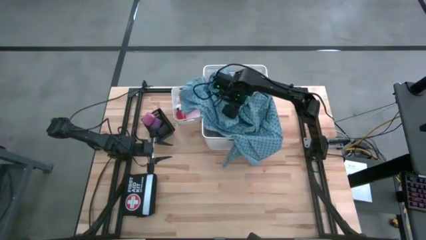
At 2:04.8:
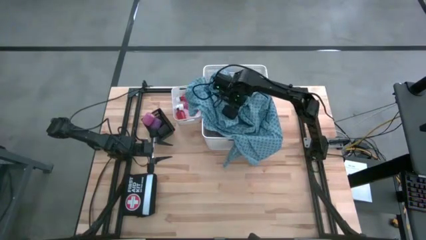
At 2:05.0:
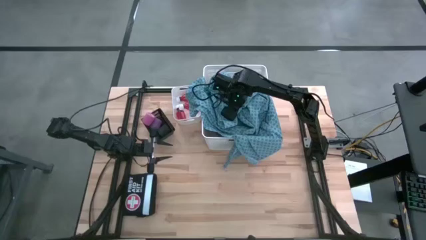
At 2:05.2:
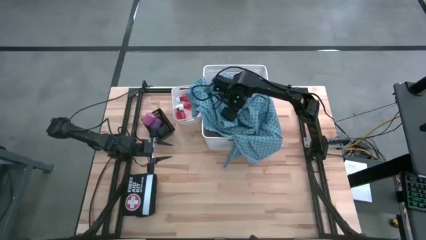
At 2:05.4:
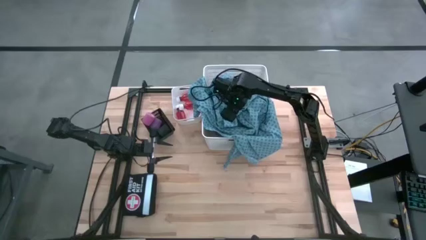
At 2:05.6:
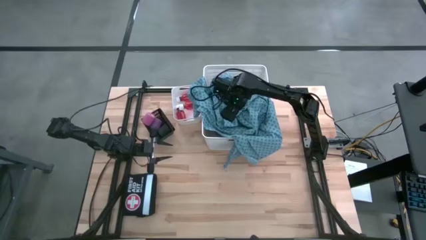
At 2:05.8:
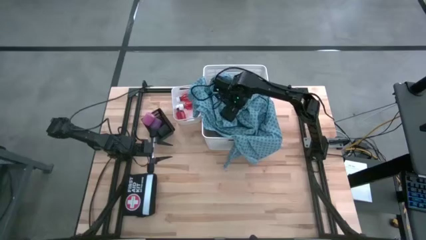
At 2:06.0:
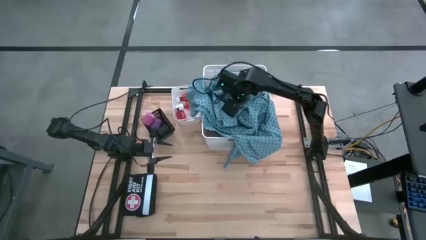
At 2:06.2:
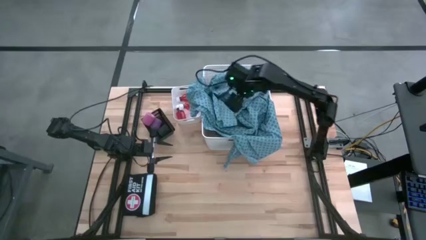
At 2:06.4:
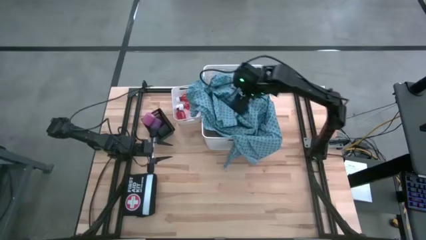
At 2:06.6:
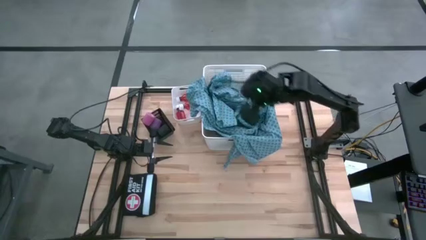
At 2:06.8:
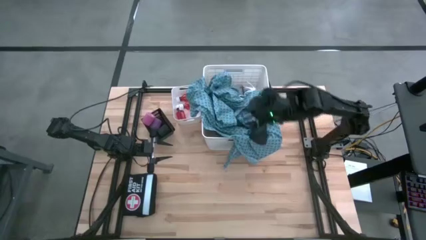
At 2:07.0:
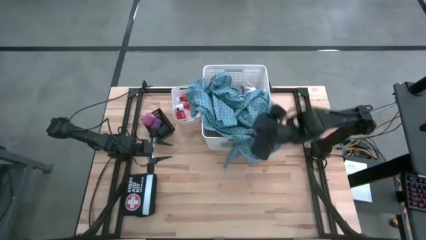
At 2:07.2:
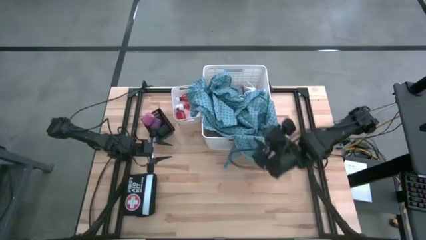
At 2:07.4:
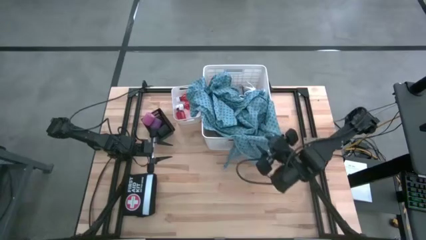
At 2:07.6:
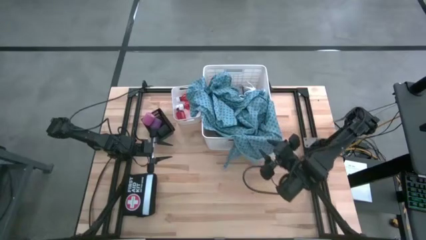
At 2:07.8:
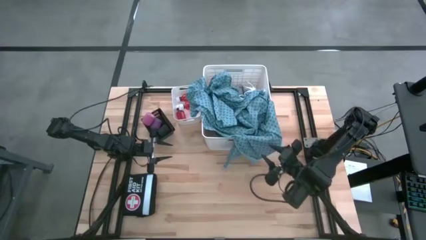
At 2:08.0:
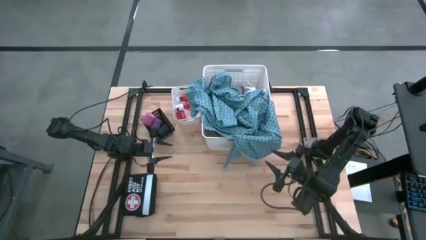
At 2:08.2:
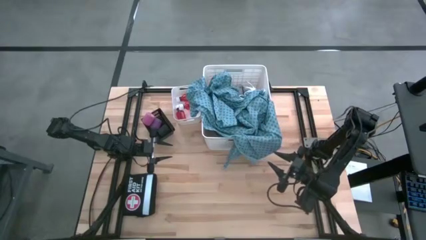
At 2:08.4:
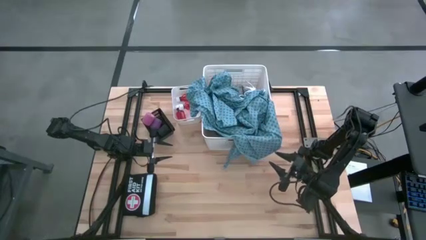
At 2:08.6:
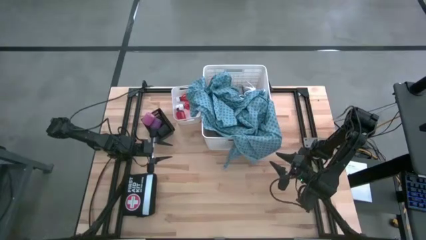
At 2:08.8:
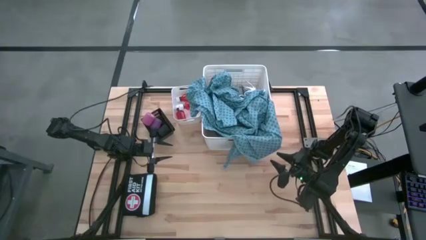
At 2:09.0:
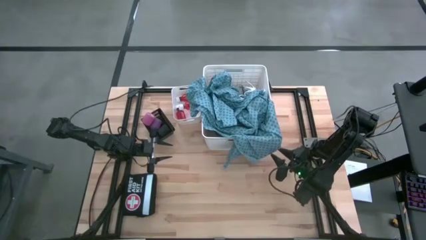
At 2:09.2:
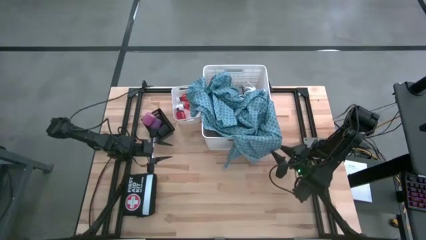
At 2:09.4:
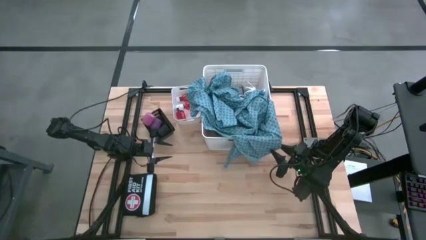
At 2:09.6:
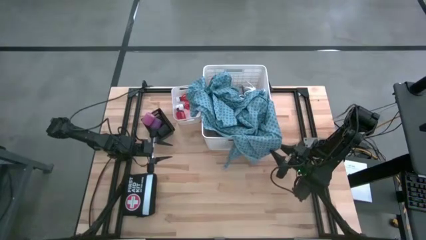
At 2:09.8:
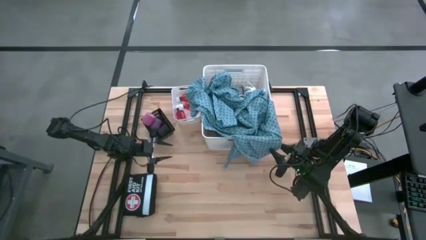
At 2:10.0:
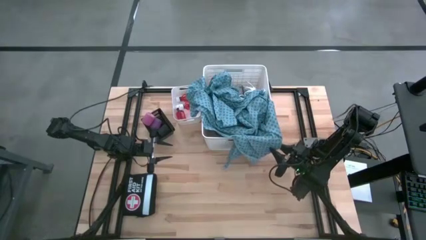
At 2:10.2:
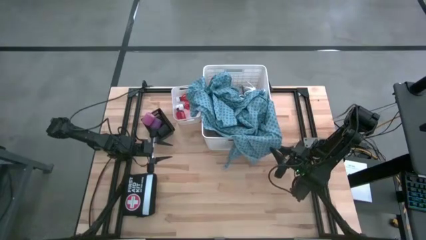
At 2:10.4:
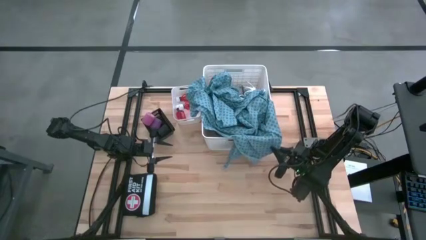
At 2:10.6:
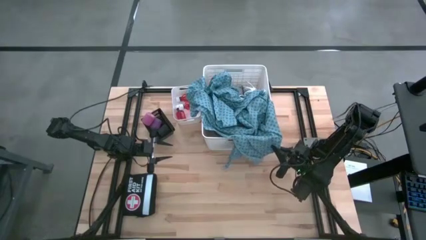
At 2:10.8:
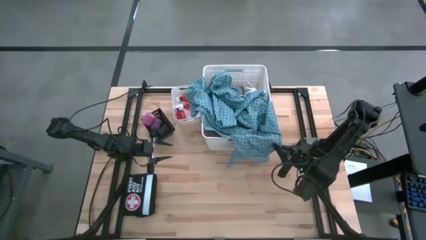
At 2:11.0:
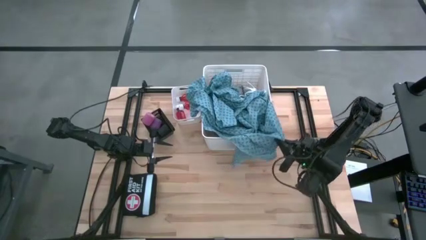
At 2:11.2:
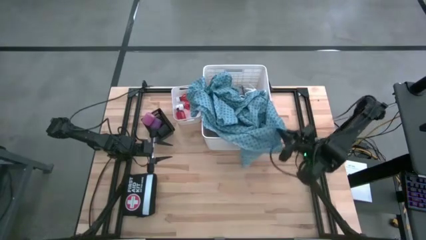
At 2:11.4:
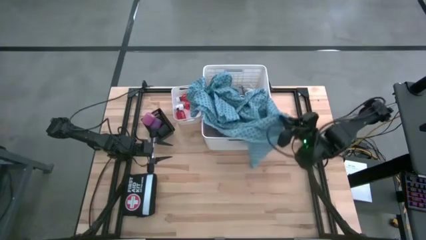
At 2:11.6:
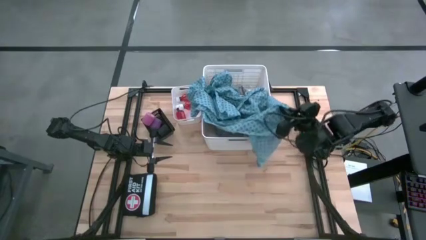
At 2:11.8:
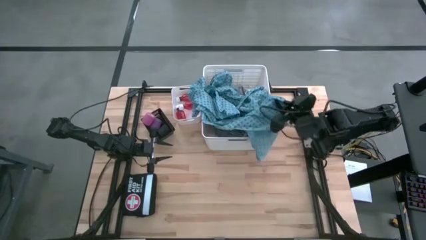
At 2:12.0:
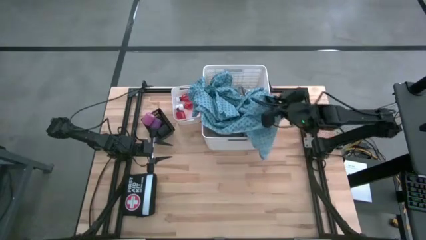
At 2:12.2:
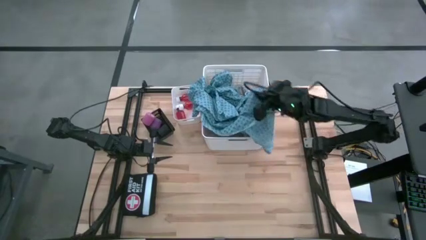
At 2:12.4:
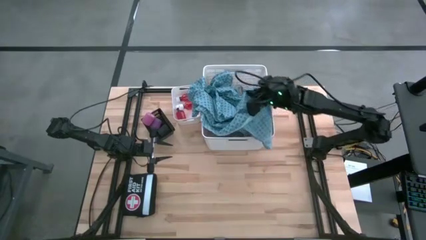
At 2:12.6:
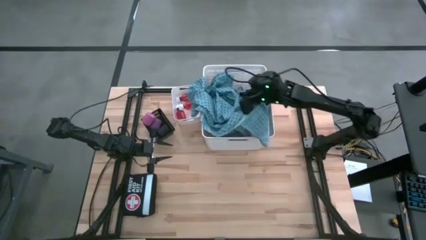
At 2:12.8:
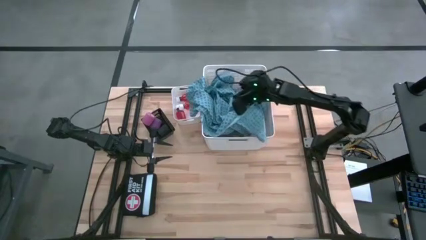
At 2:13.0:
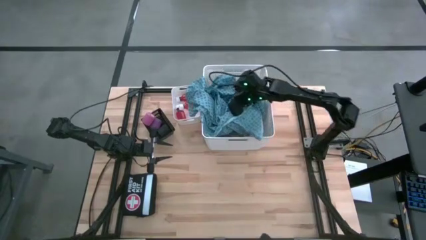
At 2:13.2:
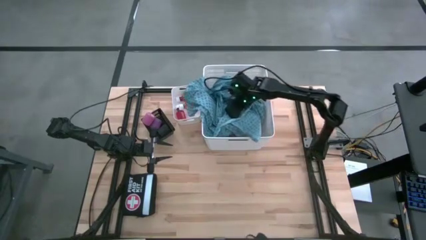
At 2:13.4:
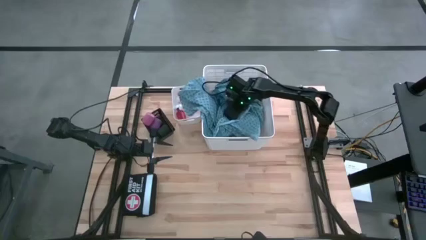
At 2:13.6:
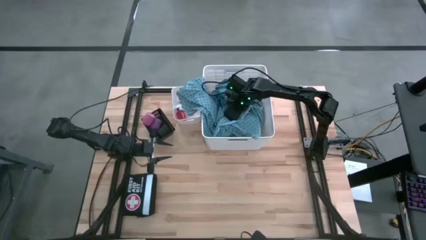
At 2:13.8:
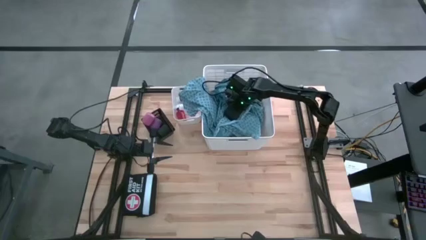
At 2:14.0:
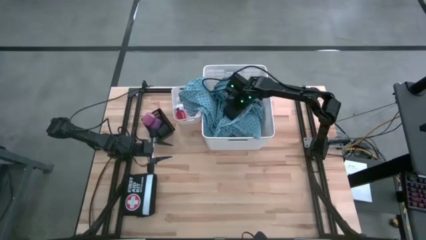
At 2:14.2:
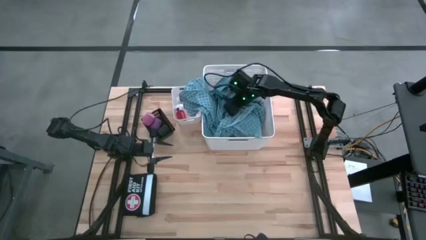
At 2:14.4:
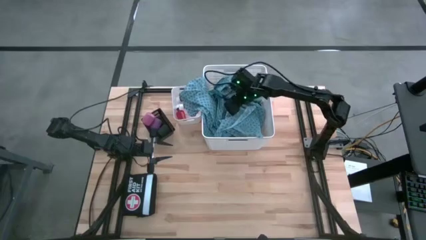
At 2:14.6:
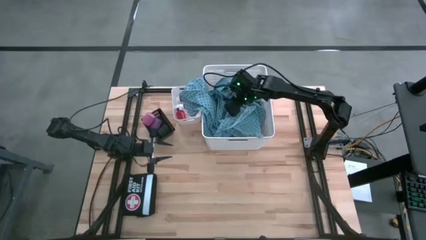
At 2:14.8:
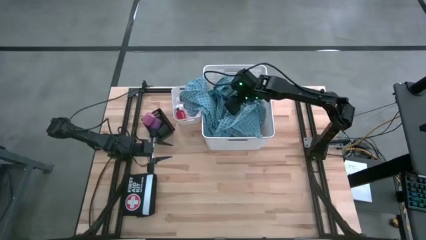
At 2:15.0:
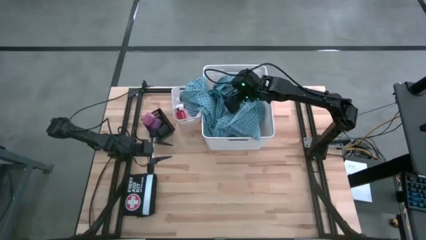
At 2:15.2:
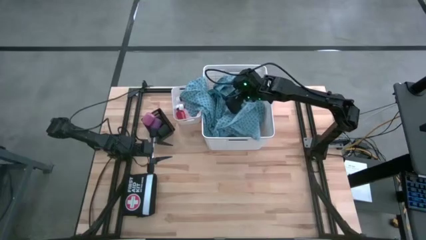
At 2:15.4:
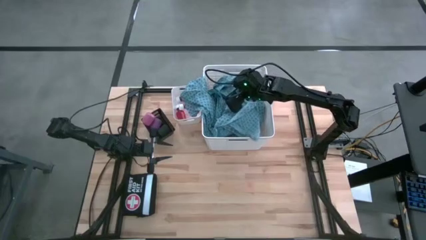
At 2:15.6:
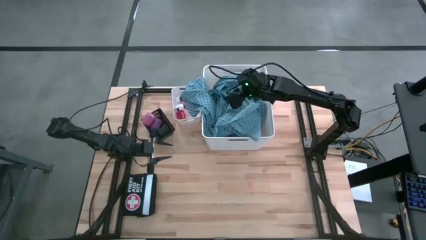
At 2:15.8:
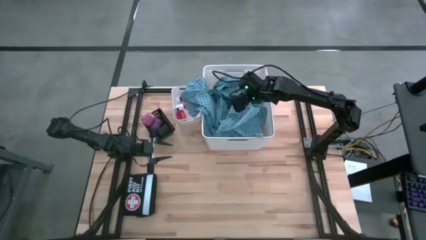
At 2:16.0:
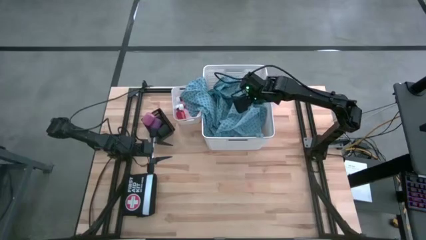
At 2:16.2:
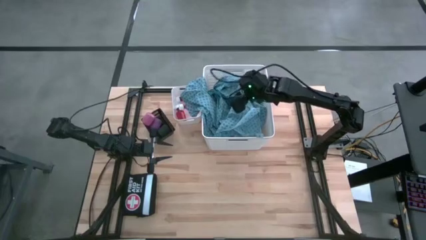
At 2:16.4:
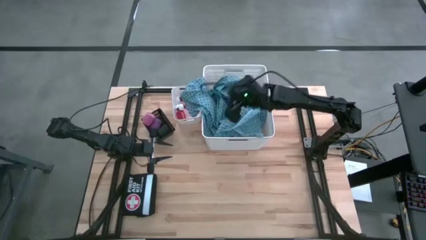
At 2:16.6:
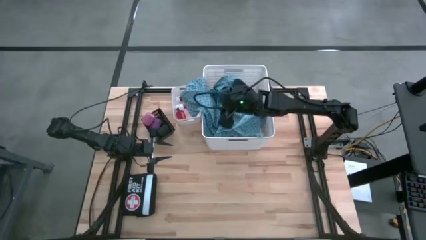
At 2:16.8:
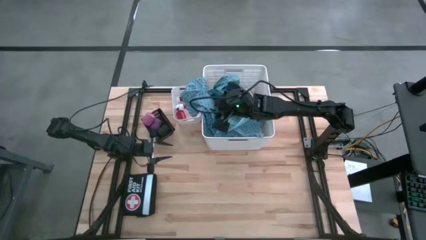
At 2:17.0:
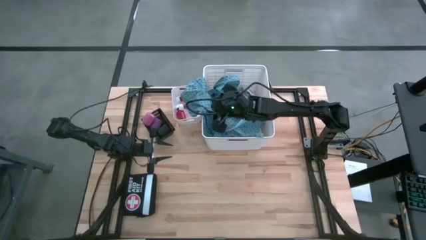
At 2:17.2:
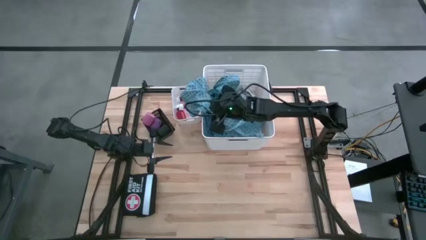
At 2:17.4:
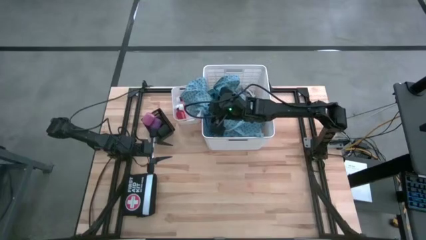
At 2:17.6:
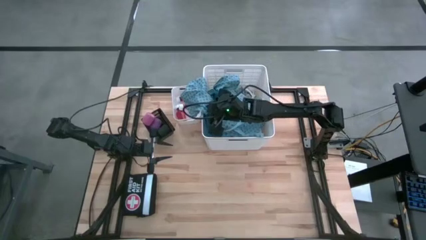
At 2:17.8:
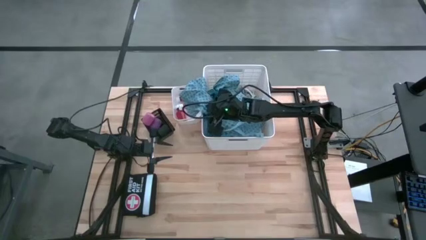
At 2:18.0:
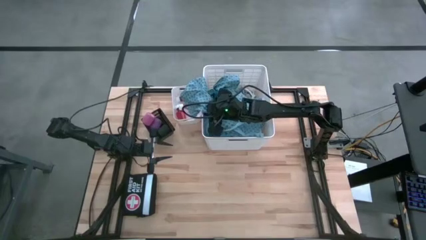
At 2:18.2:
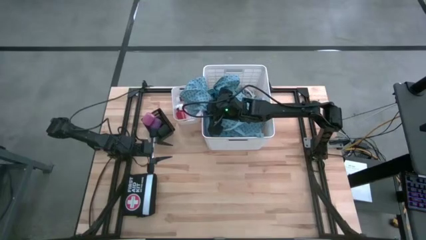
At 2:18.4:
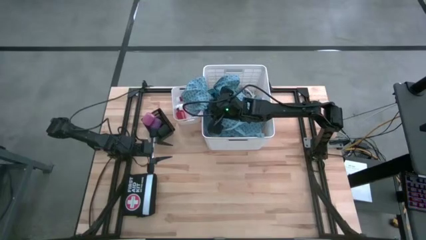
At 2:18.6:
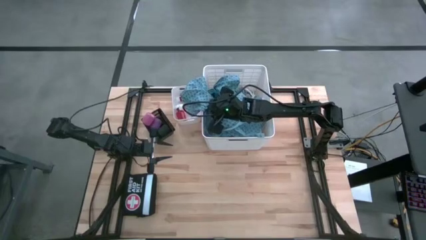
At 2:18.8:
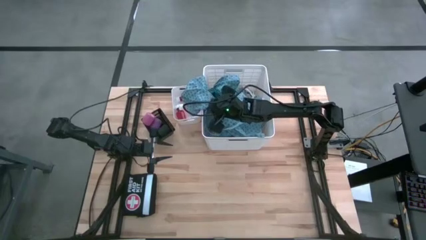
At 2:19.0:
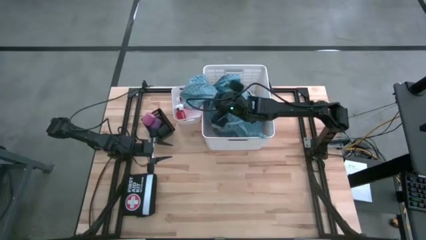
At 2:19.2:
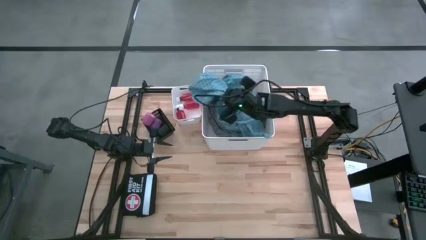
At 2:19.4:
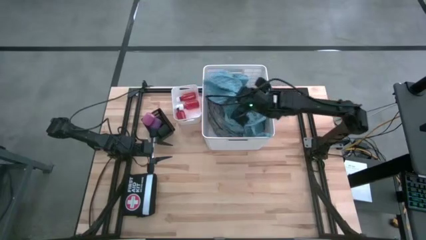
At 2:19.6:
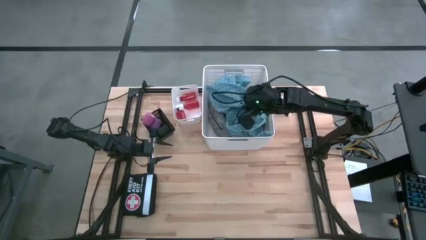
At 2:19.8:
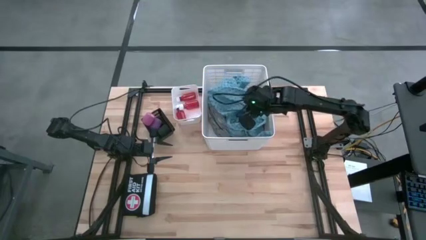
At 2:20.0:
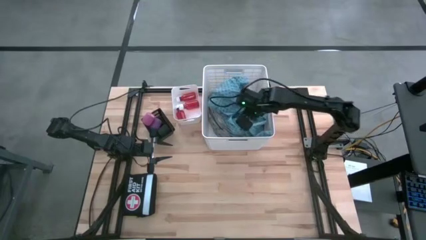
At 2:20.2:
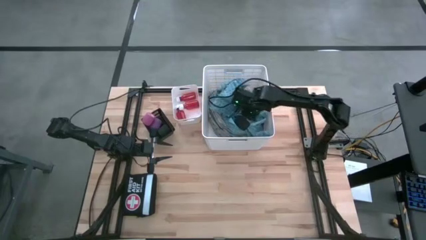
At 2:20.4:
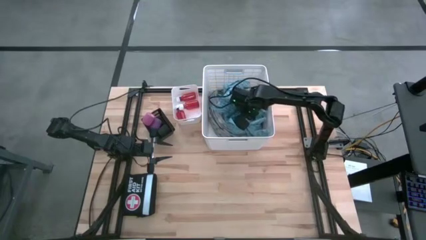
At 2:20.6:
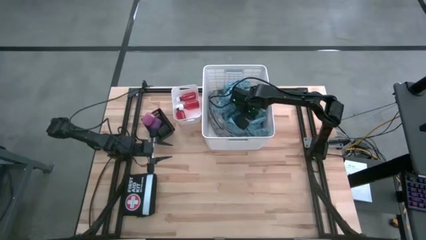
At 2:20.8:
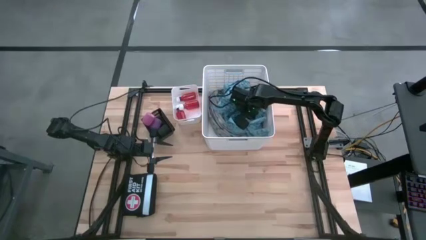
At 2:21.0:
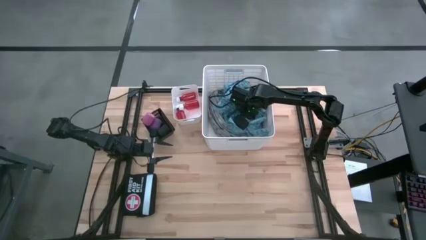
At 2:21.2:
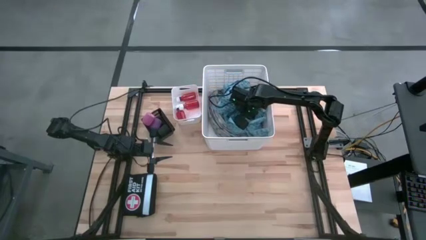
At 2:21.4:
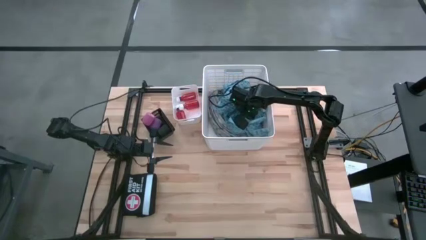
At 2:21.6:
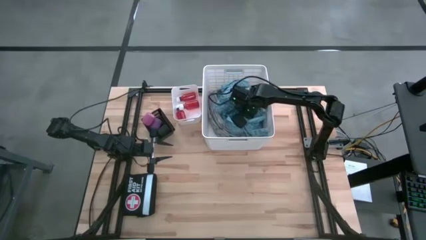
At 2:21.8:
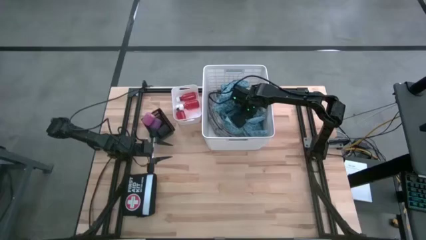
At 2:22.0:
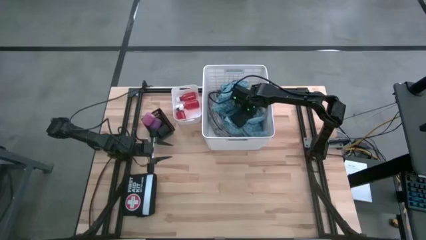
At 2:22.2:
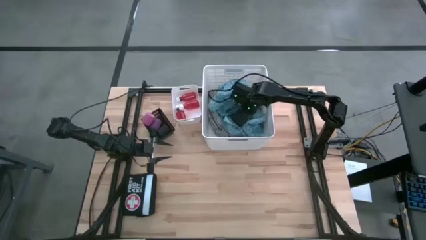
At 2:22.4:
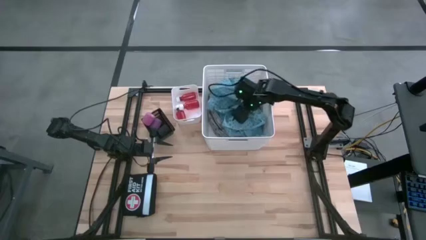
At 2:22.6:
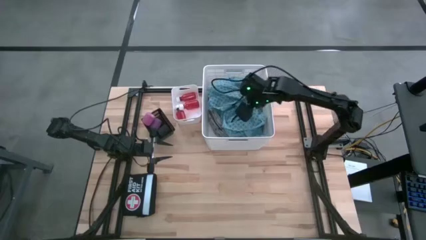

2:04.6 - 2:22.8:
Task: Pick & Place Medicine items
Put the blue patient gown into the white laundry bin
